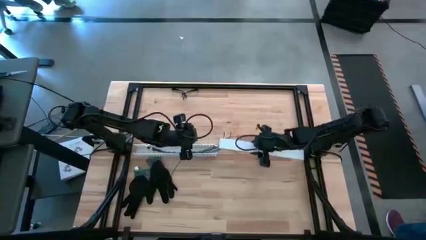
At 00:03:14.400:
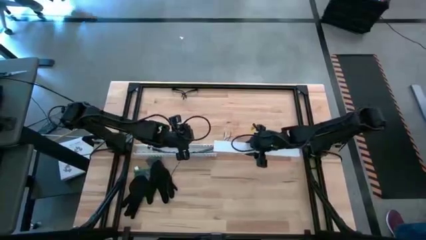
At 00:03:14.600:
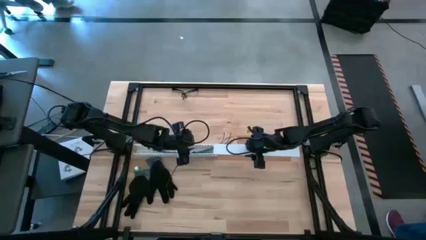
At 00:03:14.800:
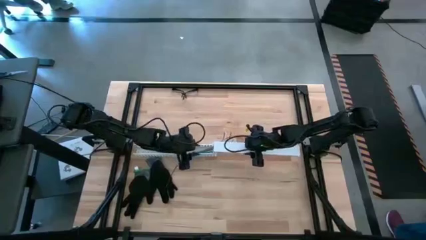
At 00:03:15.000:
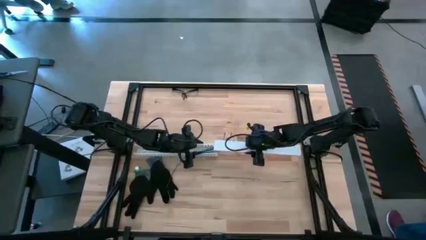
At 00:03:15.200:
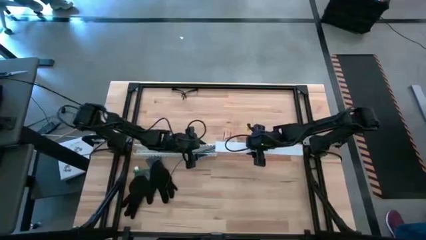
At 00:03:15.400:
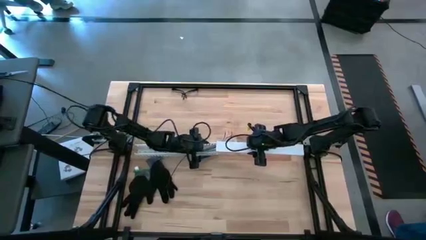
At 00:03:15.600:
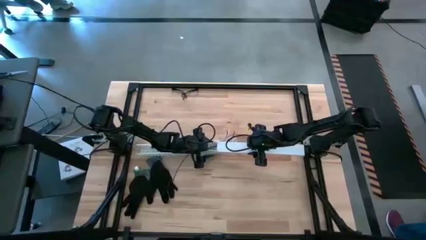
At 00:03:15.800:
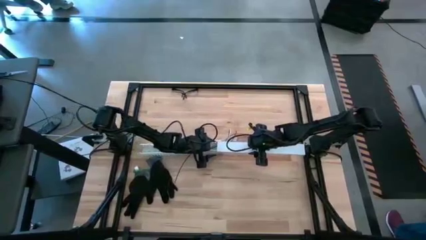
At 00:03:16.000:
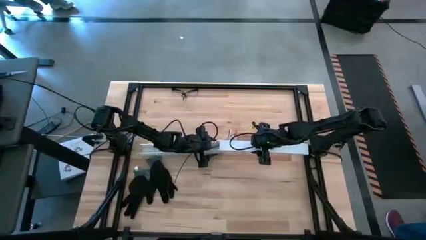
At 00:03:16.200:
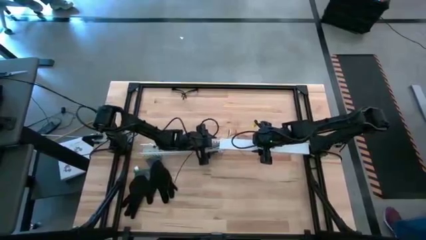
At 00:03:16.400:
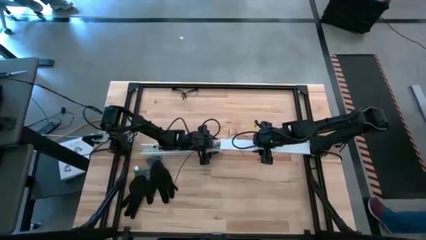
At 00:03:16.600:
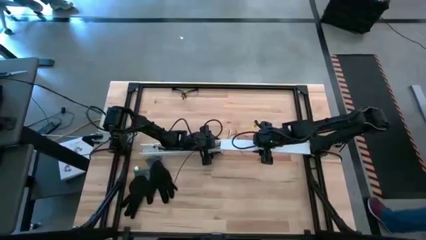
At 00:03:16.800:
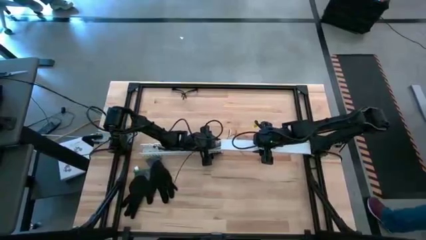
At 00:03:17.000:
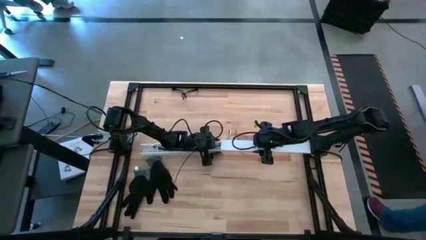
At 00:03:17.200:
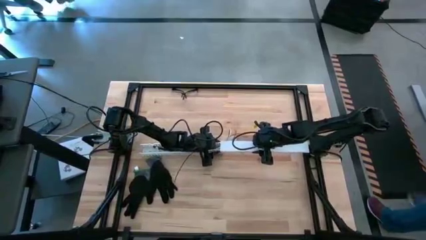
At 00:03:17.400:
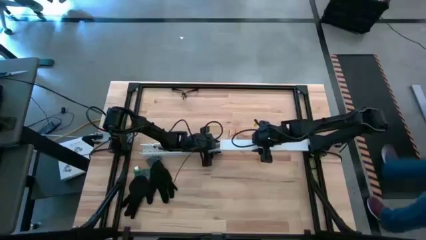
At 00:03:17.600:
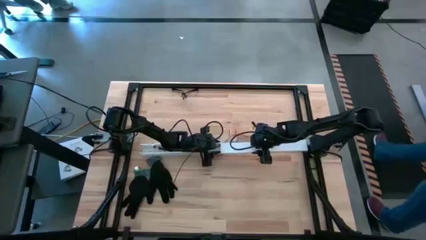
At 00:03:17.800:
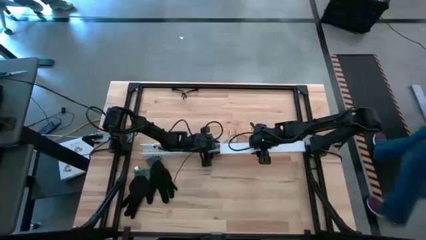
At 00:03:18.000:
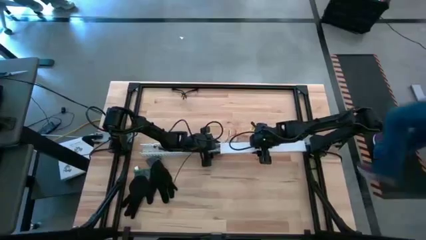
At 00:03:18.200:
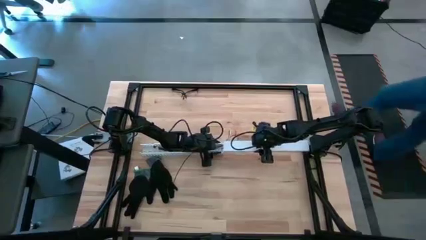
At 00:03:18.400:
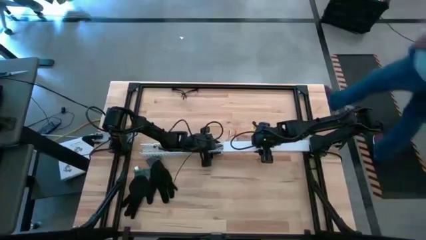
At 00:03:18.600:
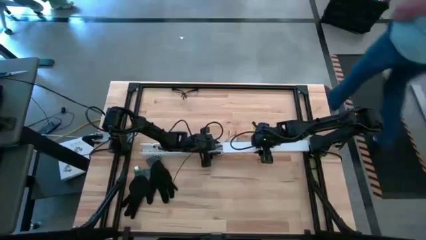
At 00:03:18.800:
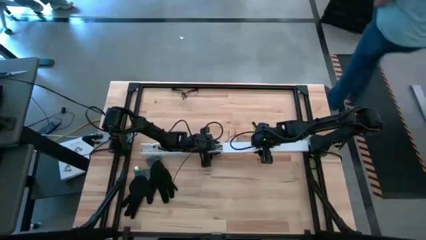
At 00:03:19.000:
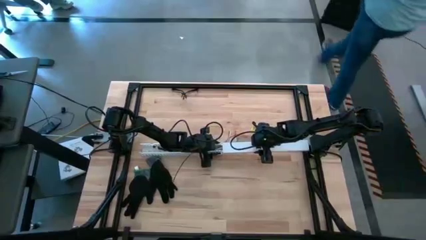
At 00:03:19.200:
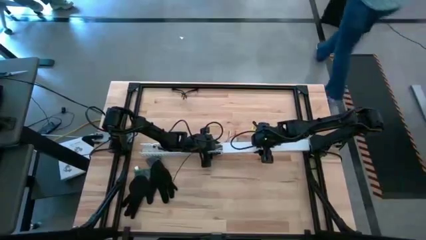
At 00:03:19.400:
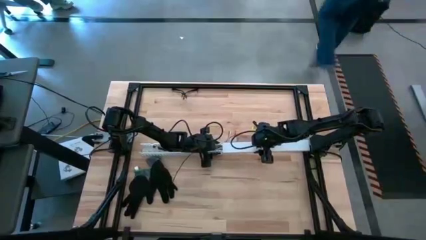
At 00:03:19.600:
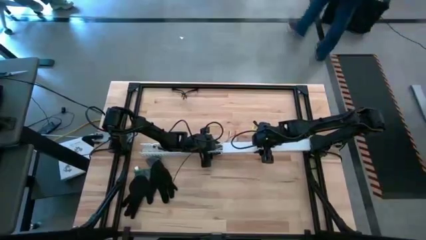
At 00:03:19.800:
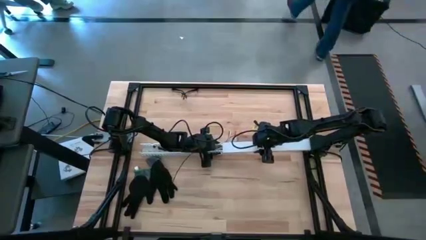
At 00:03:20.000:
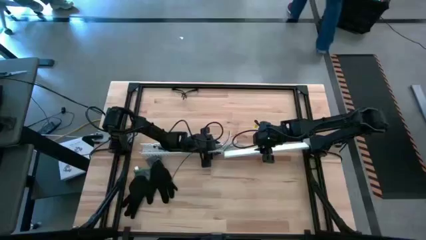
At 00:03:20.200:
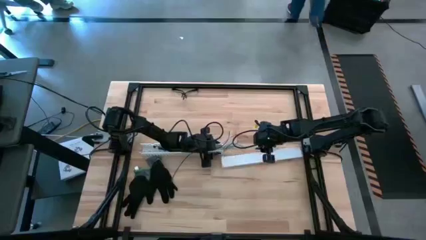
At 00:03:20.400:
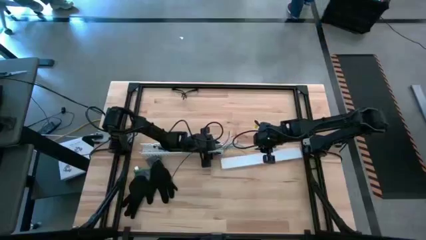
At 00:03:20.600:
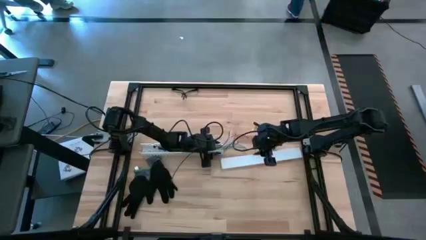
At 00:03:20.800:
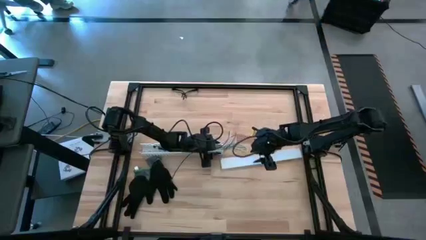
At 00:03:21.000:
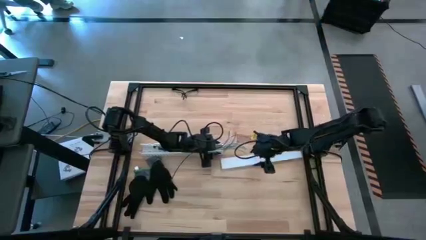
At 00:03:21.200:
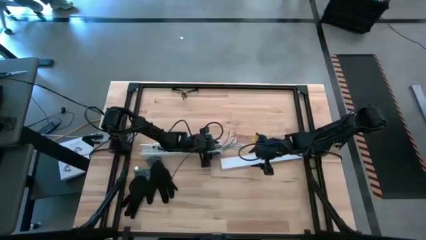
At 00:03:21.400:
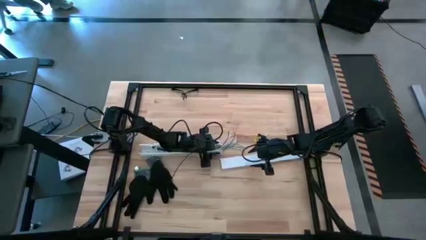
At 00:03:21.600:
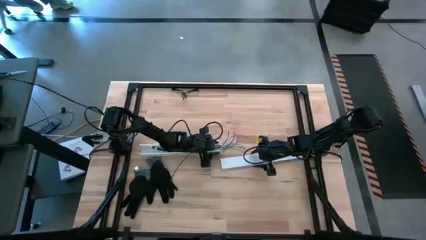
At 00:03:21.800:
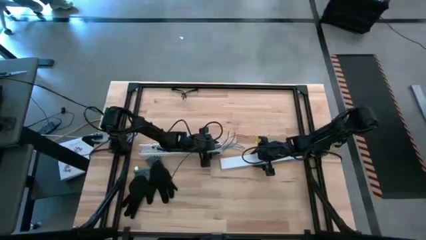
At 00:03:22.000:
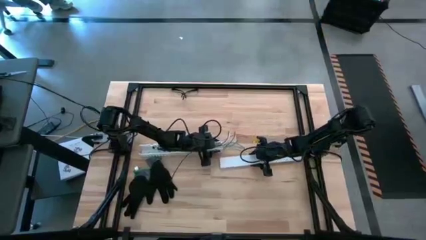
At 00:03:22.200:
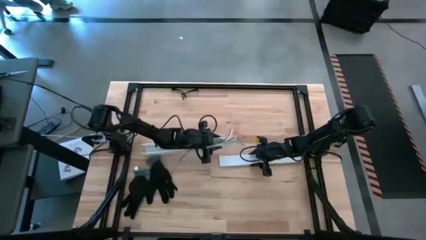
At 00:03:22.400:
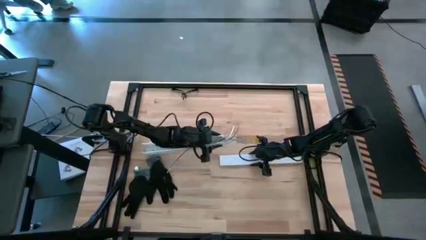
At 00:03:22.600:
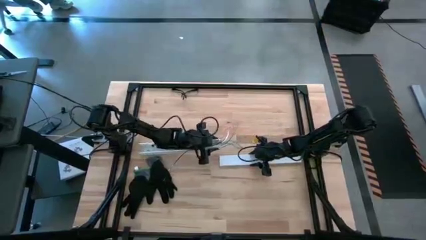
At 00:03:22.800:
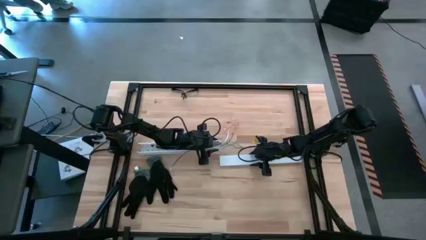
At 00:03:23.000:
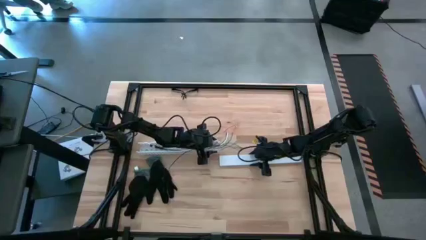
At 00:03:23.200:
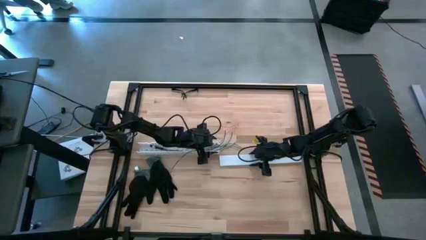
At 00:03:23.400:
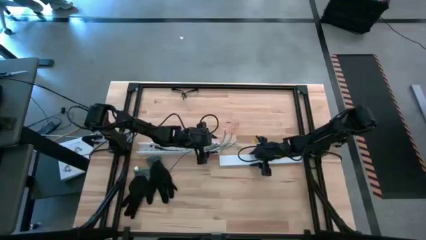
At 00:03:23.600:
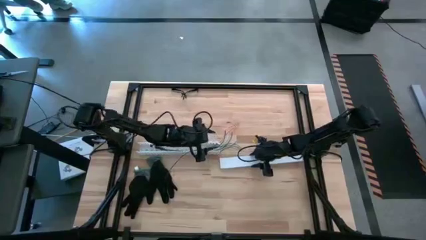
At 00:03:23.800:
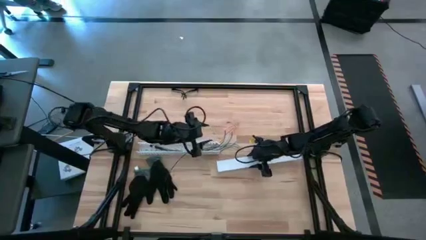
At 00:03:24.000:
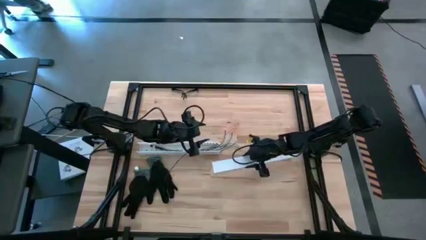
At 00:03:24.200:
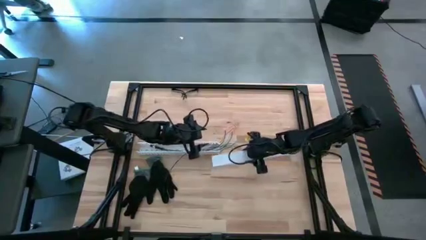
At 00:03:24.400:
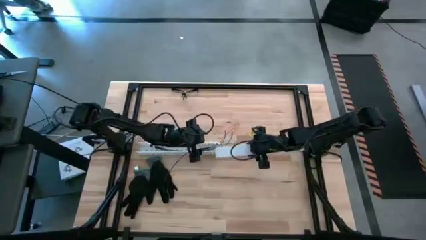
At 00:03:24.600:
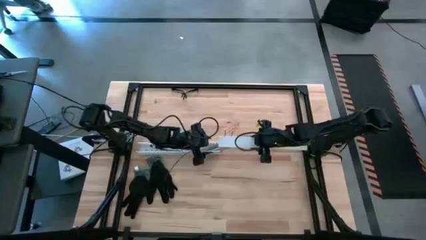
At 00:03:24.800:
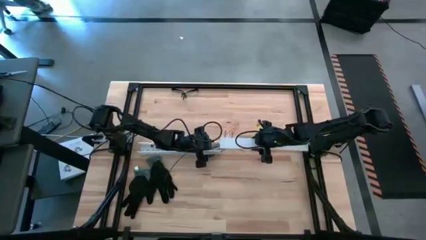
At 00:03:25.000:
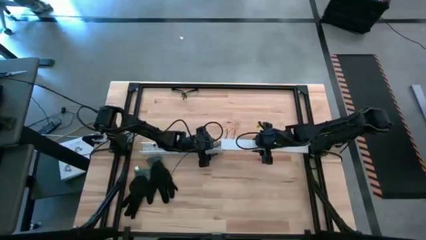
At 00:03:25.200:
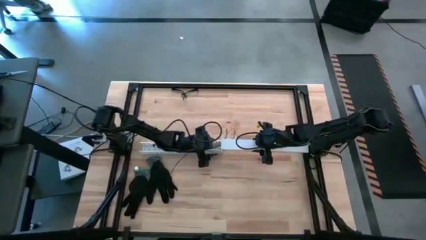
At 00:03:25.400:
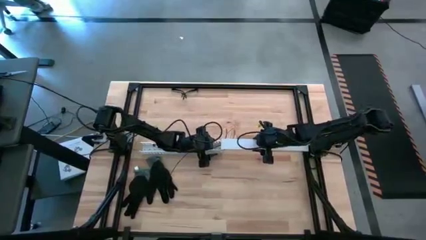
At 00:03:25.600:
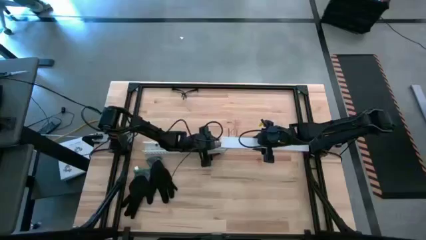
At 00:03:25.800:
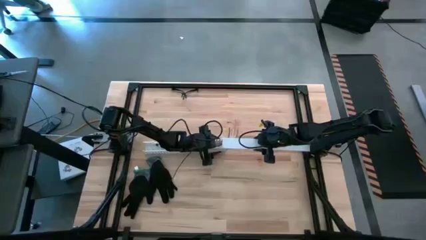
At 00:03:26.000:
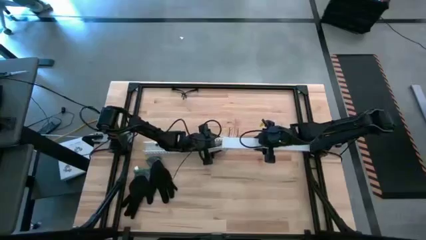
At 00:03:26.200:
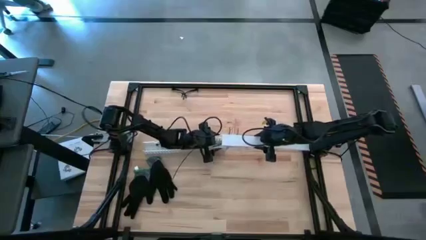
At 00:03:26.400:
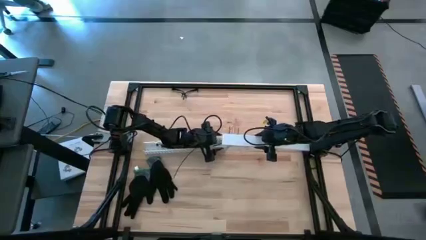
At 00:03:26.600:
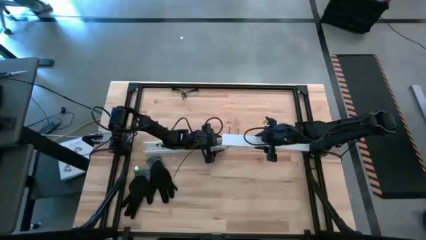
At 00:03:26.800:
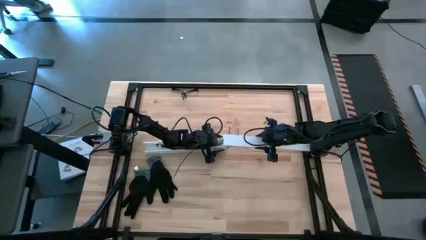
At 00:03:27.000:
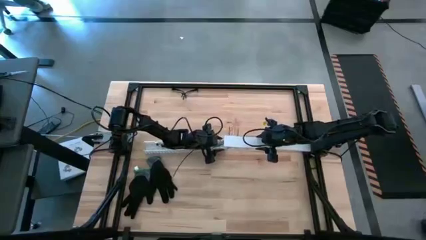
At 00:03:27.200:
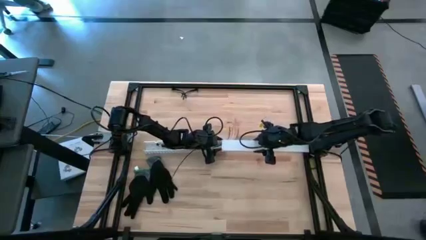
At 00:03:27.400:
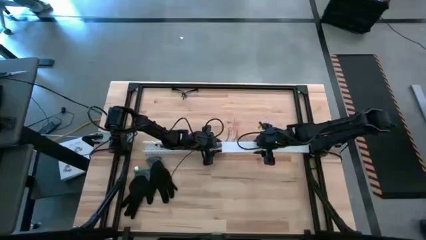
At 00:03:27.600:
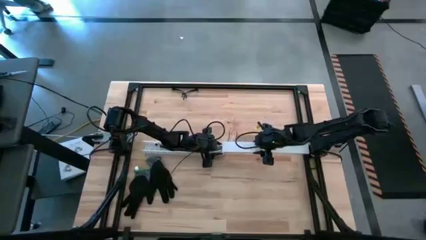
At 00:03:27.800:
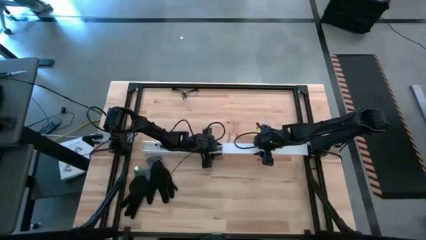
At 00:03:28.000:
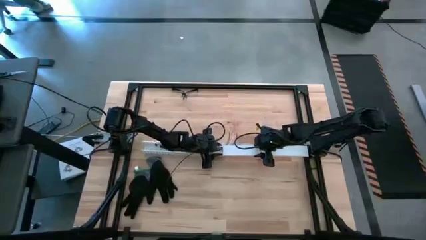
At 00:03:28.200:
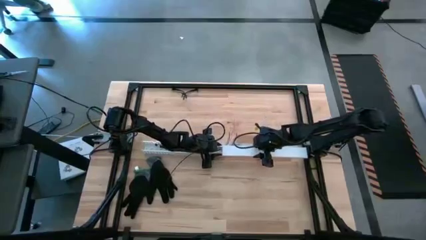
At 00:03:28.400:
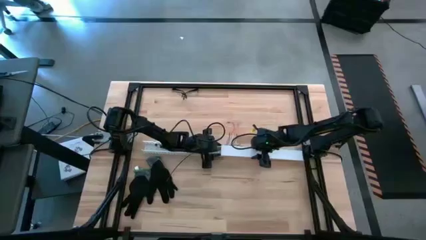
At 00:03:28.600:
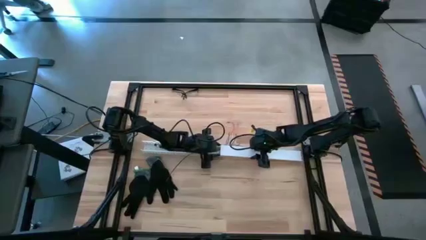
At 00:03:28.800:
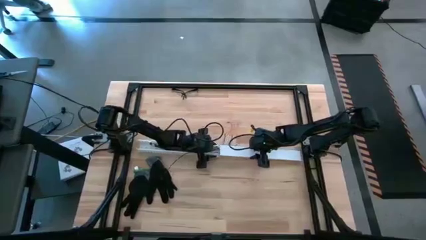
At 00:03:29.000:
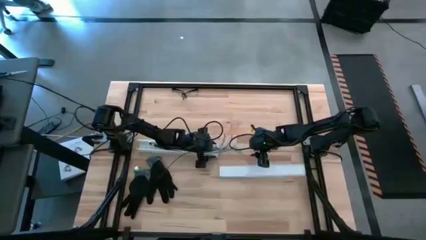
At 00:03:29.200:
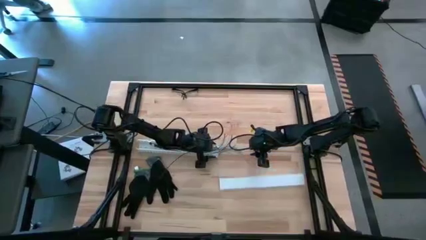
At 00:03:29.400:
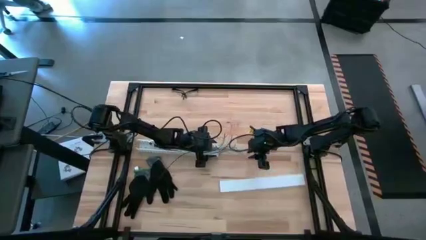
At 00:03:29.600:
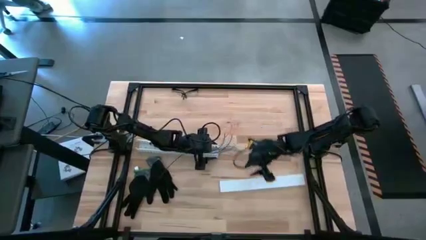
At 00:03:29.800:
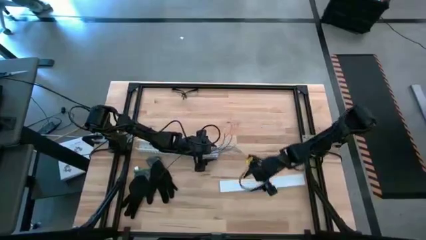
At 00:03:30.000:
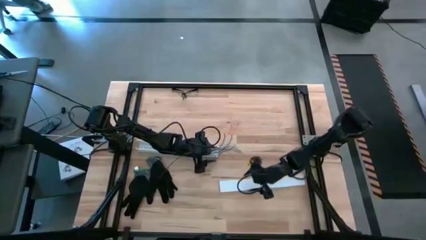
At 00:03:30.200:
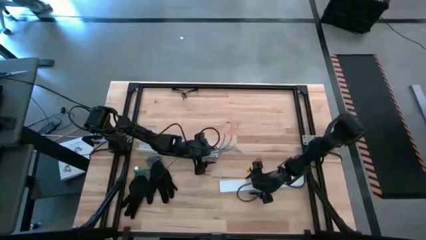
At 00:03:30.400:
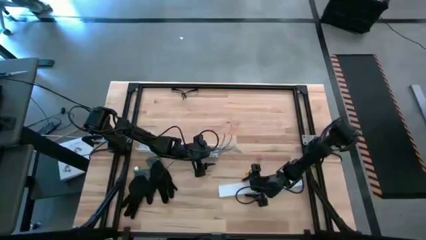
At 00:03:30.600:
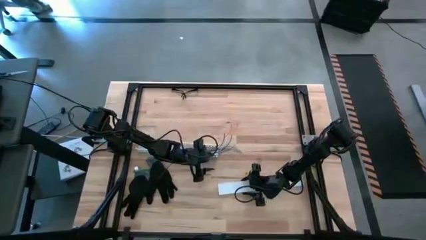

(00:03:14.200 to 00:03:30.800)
Task: Ziptie cables
Close the white cable duct
